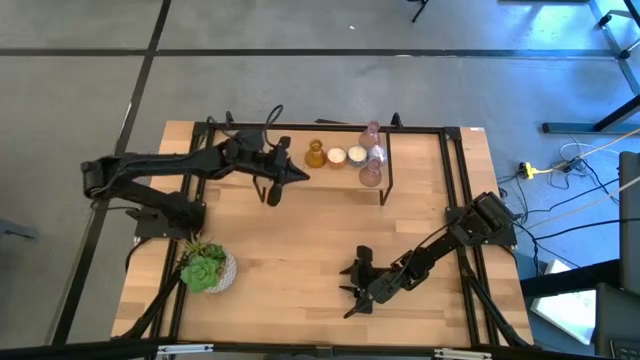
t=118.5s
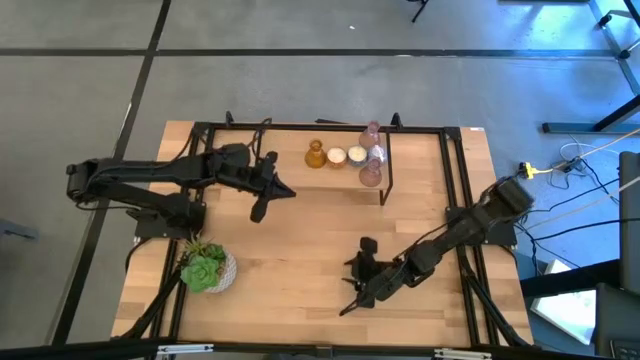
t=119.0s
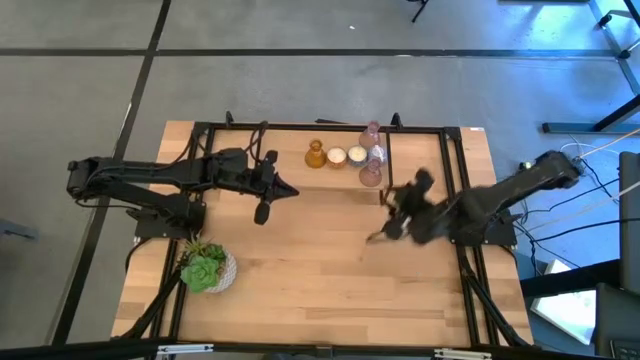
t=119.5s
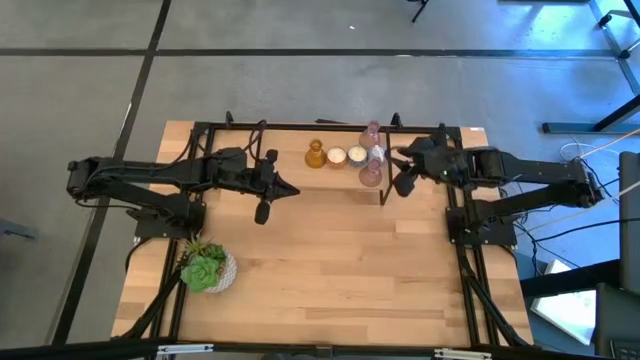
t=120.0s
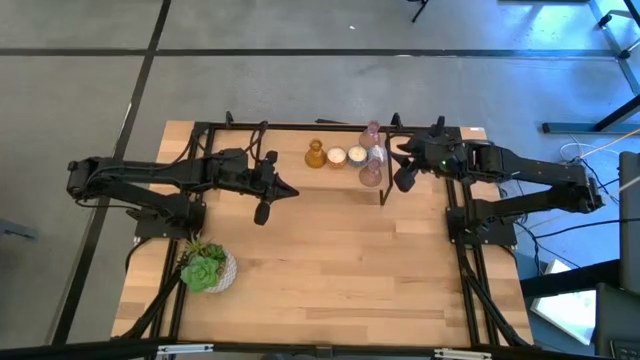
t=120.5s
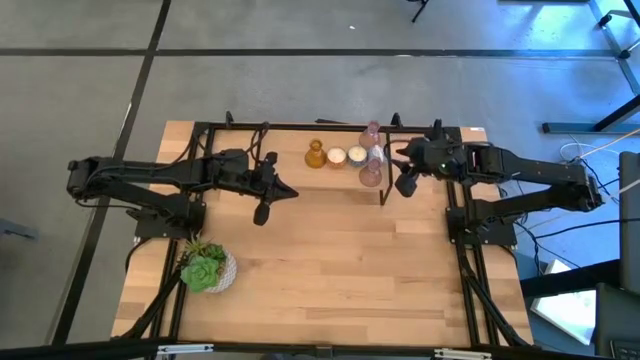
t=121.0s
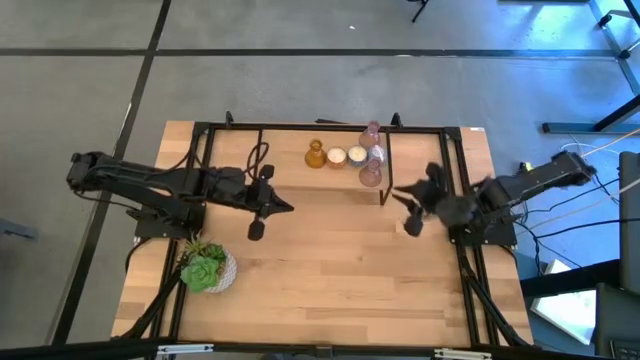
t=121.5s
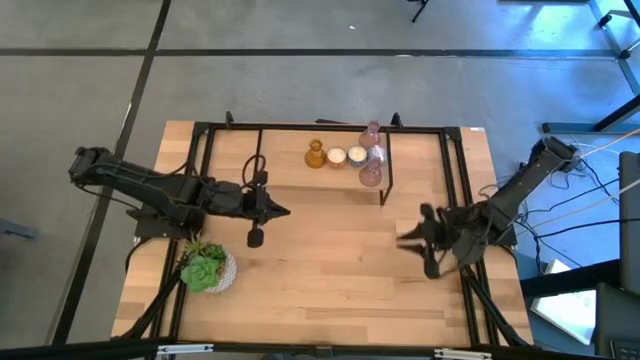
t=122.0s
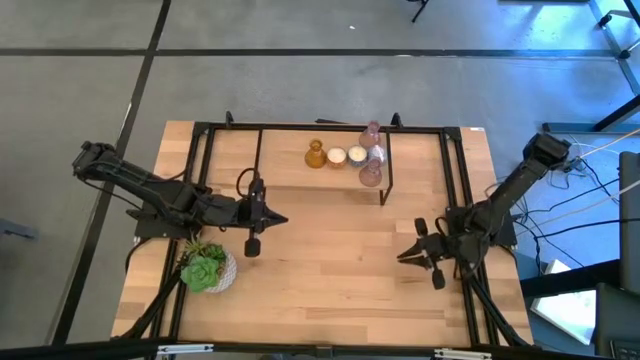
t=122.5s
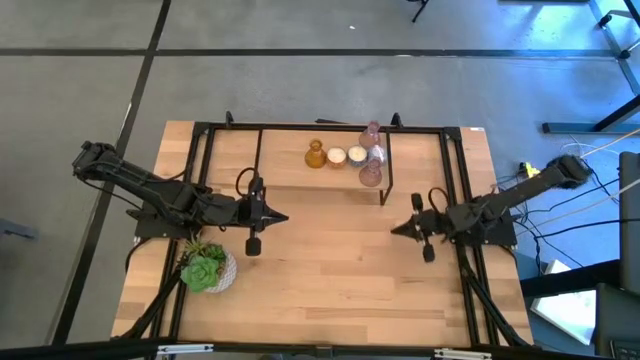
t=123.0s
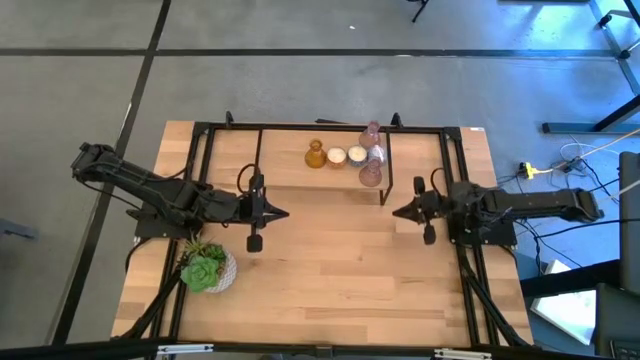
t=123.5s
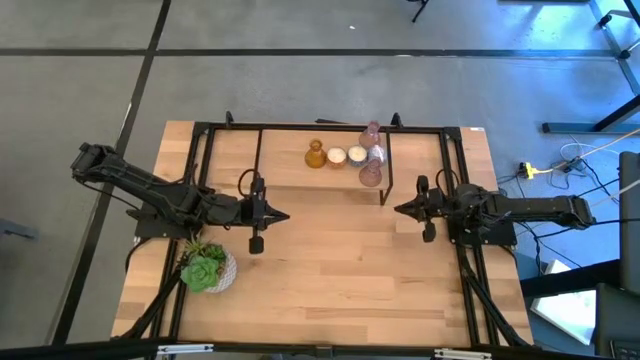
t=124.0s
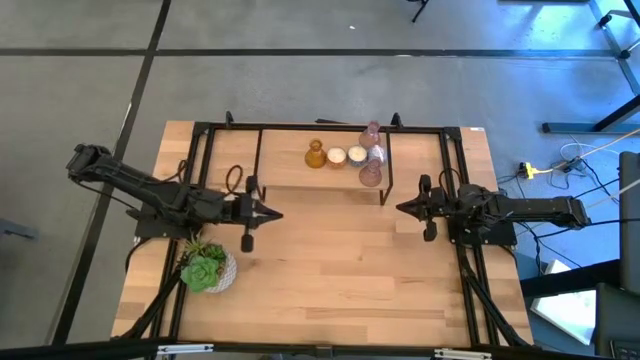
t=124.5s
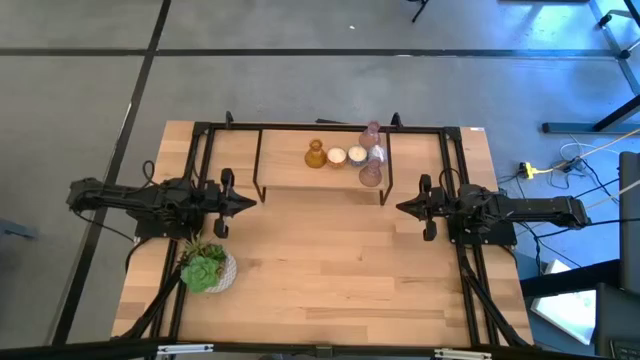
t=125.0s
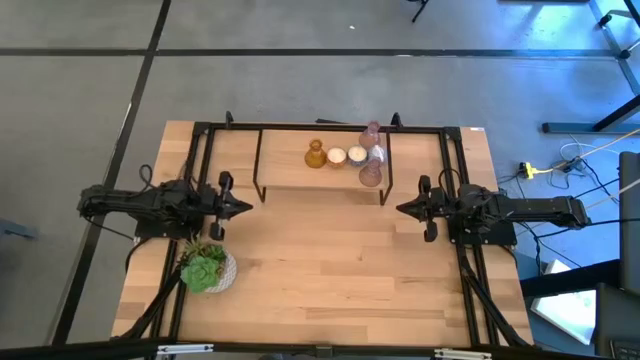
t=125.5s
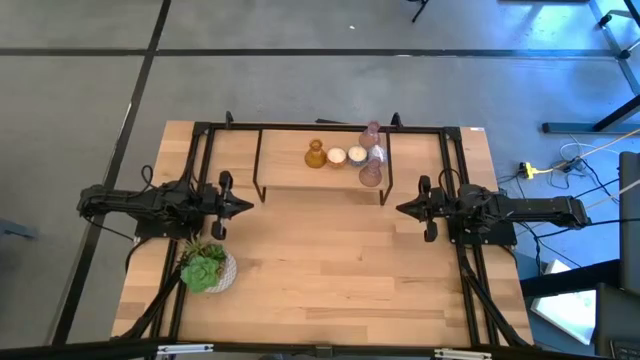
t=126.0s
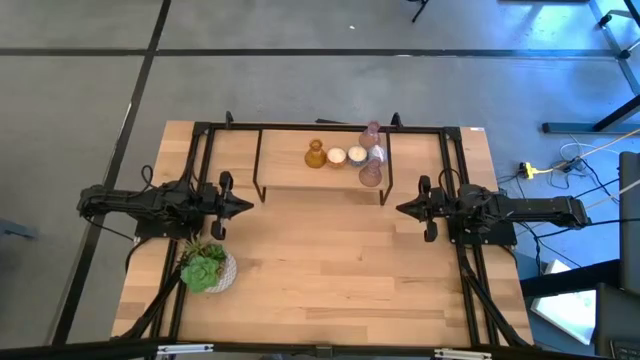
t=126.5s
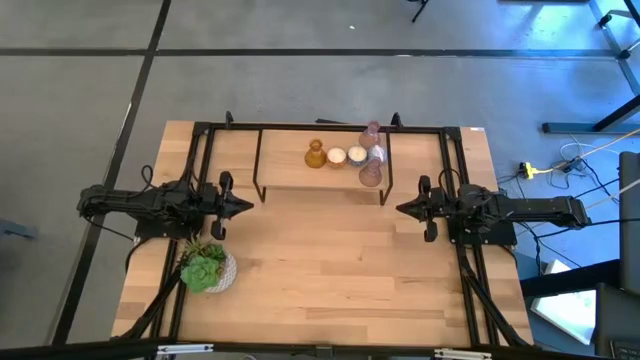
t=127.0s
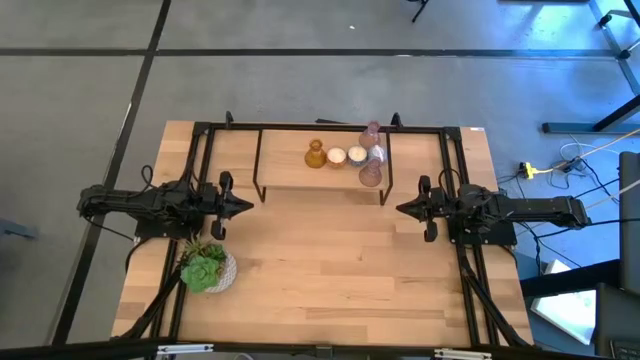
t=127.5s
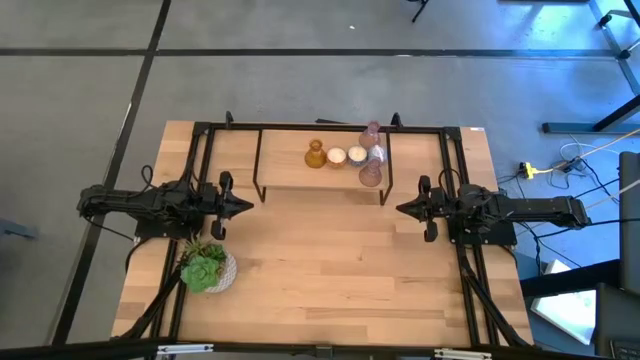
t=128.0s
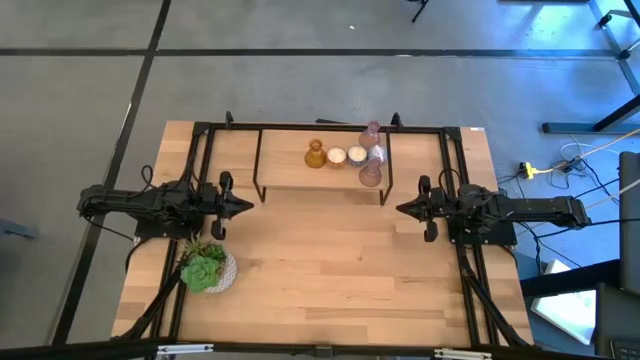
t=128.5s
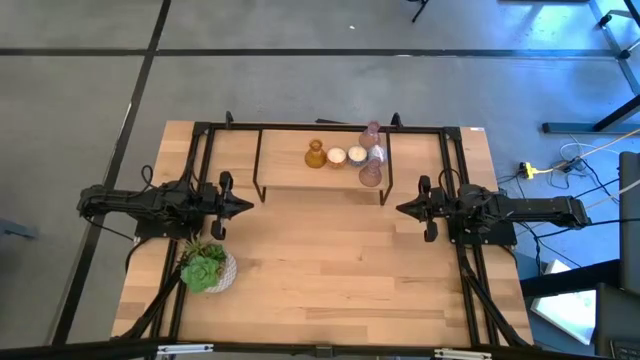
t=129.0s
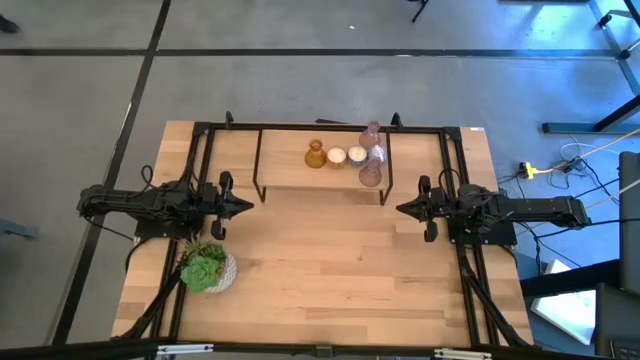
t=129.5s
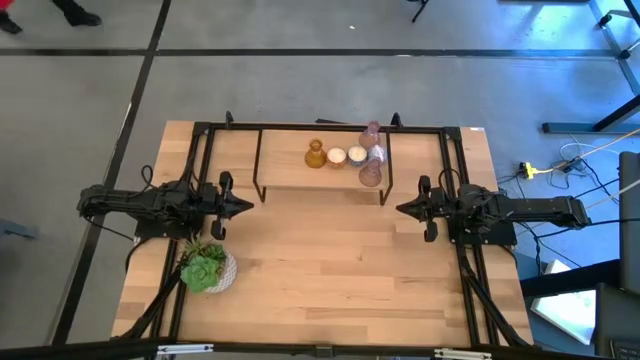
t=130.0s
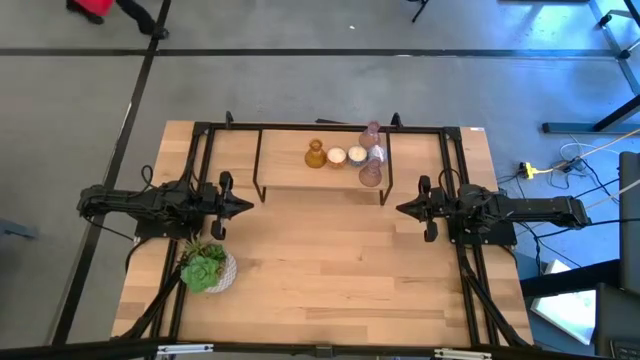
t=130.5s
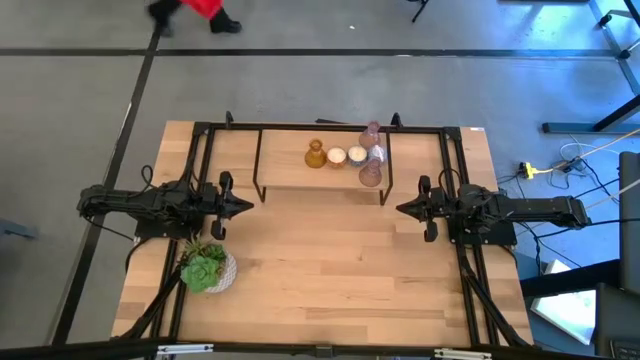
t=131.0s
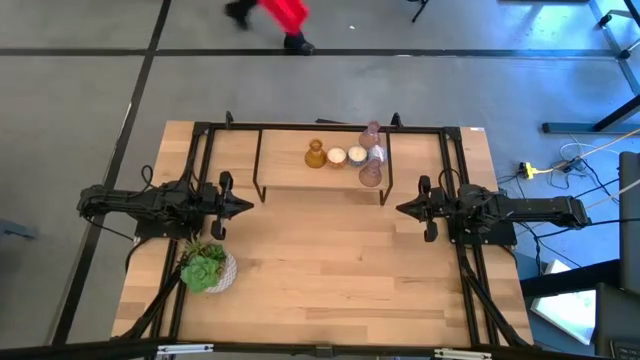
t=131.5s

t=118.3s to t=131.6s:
Task: Pick & Place candle stick holders
Return to Home Position

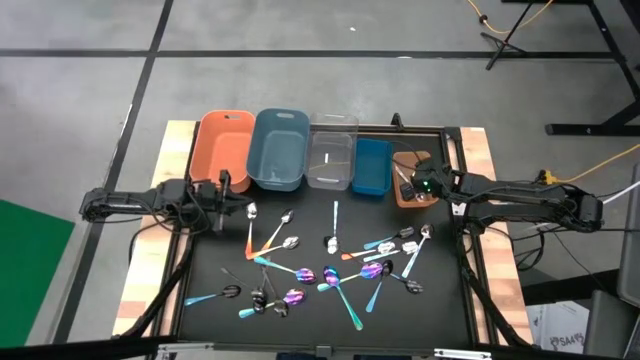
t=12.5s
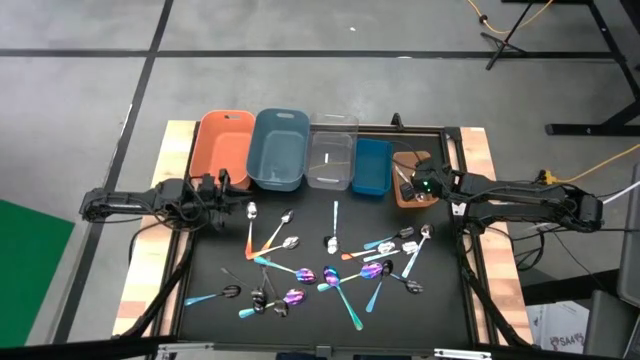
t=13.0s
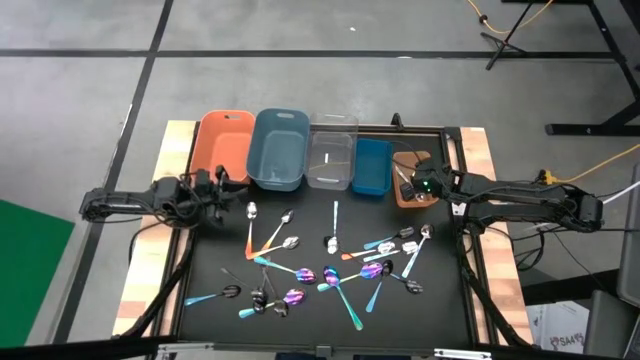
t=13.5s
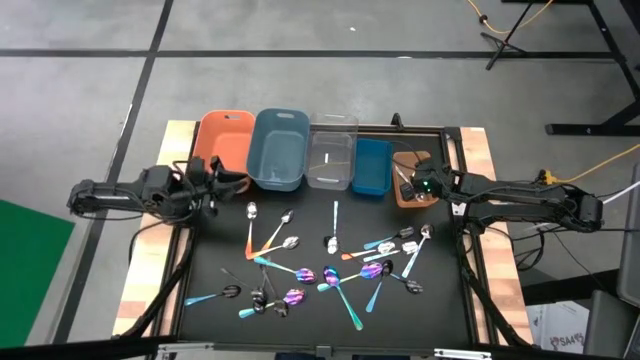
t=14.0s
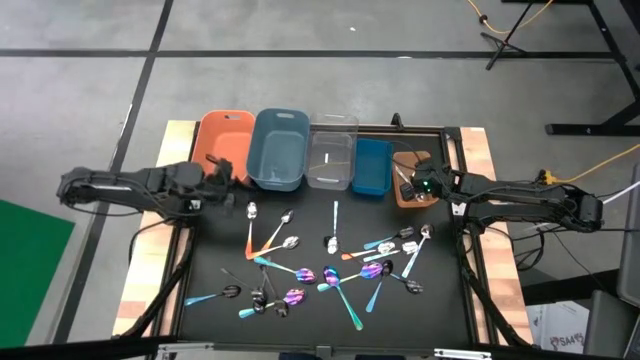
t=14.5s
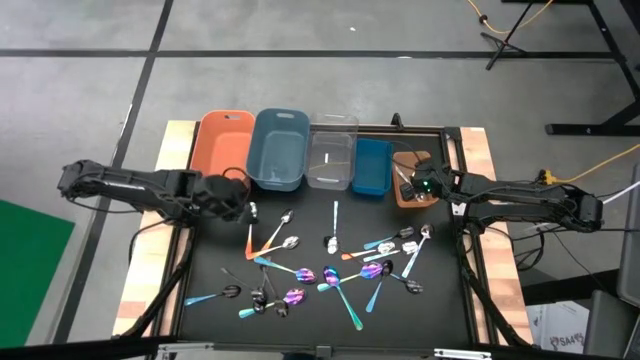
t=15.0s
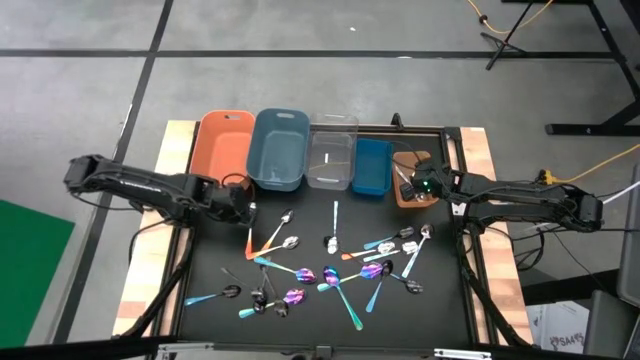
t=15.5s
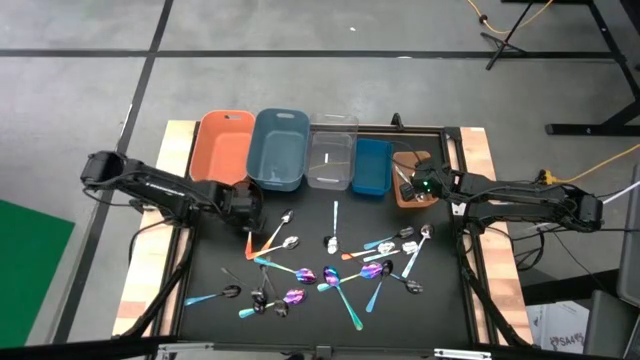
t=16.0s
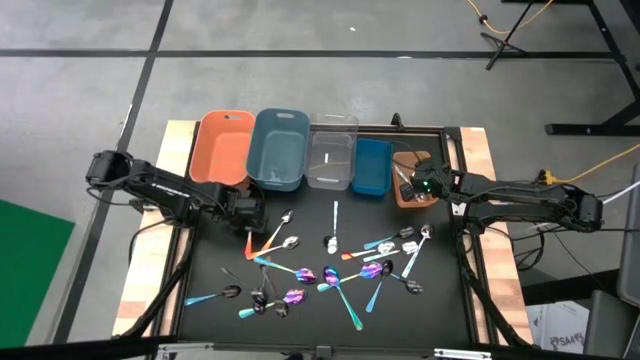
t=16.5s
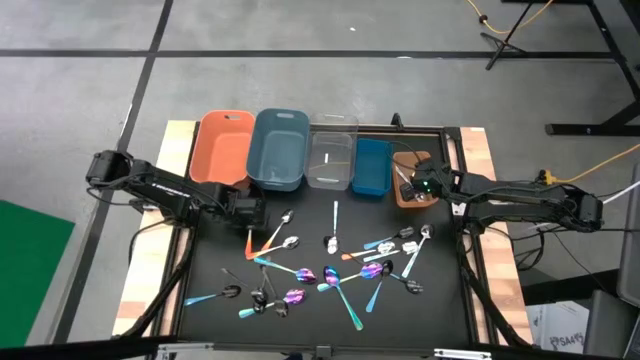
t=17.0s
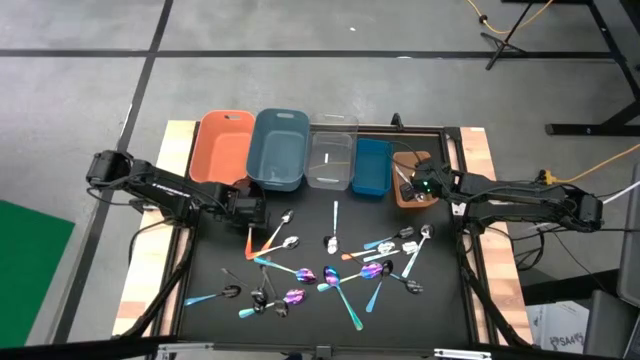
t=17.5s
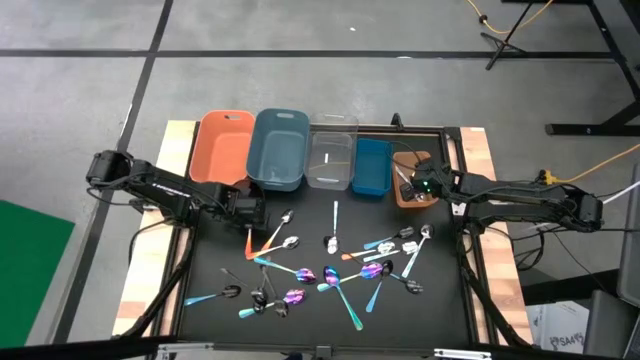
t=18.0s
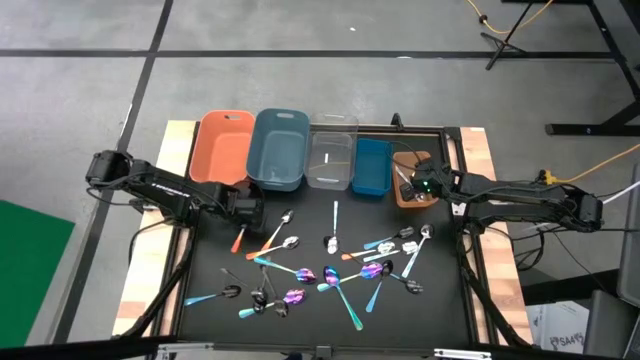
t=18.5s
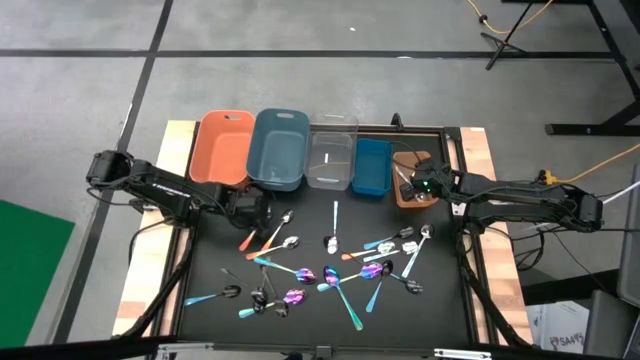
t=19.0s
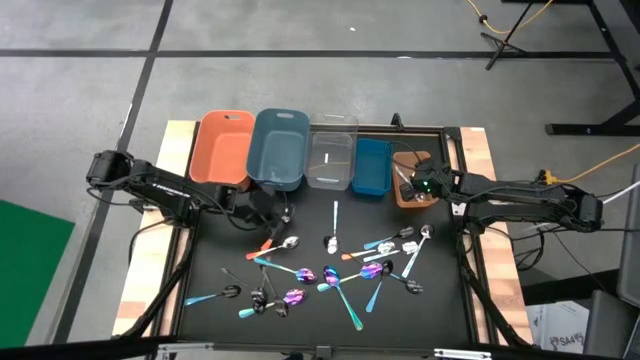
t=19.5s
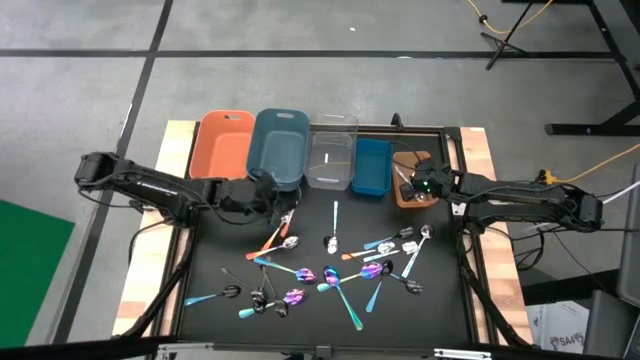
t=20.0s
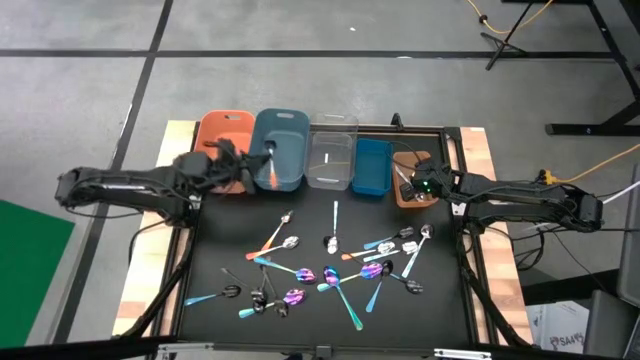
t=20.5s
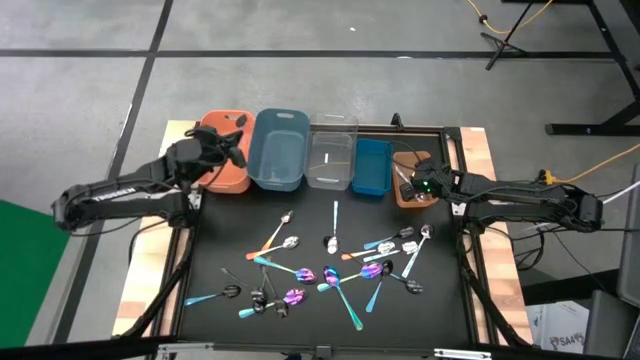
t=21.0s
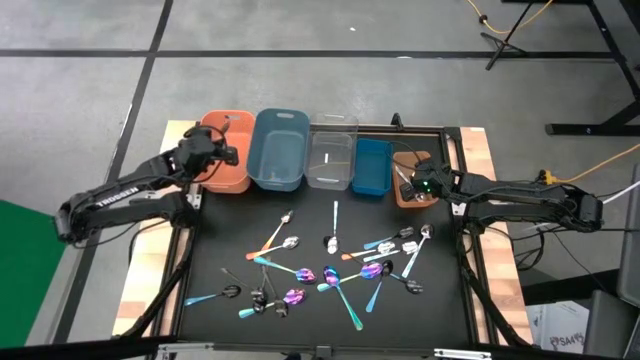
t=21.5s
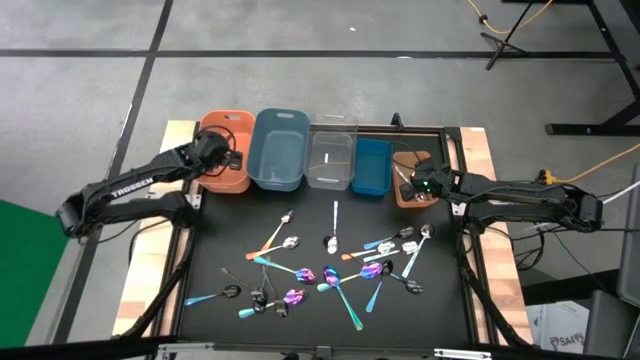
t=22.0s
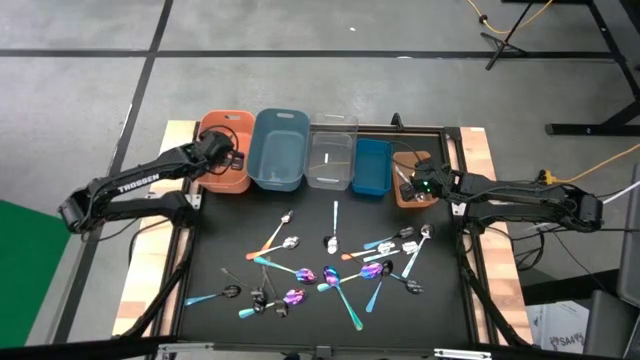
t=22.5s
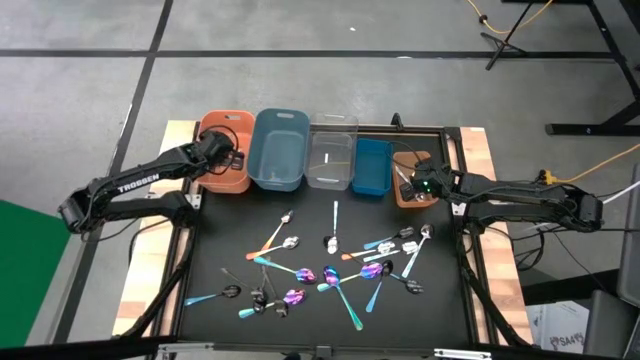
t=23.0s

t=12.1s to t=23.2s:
Task: Sort silverware by color (type)
Put the orange spoon into the left orange bin
